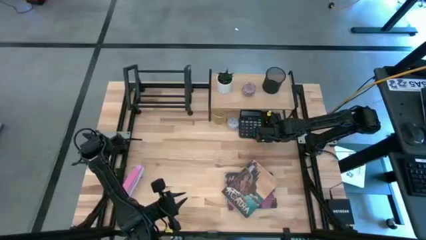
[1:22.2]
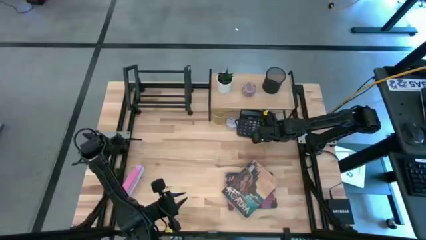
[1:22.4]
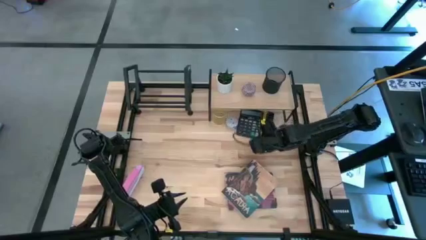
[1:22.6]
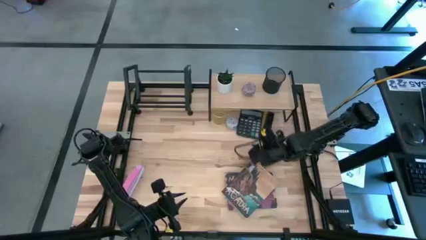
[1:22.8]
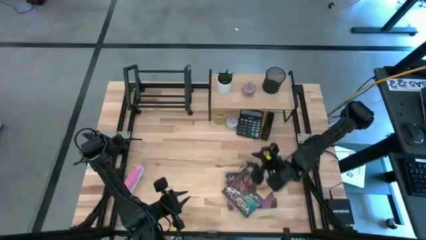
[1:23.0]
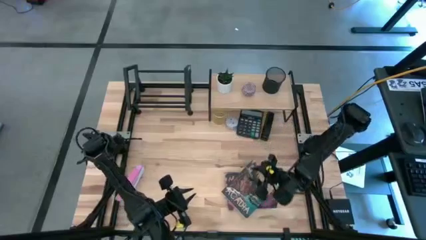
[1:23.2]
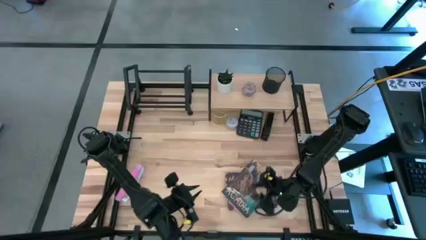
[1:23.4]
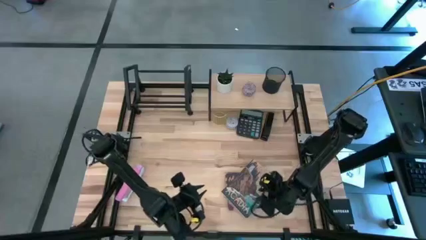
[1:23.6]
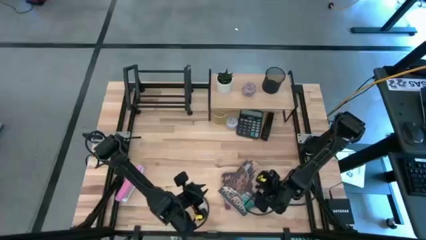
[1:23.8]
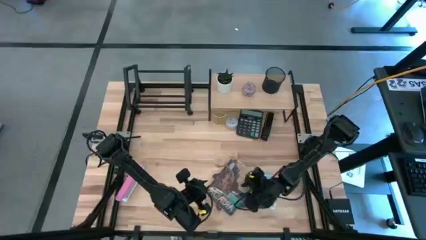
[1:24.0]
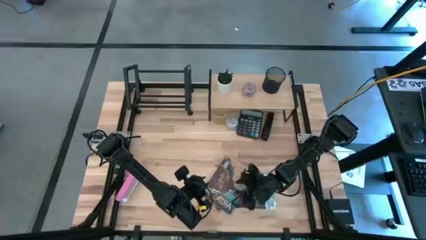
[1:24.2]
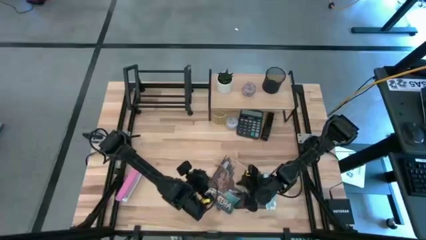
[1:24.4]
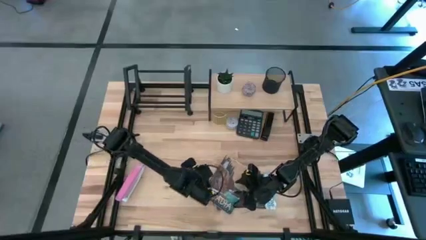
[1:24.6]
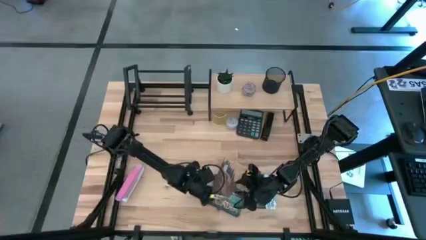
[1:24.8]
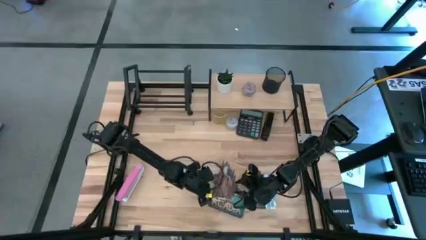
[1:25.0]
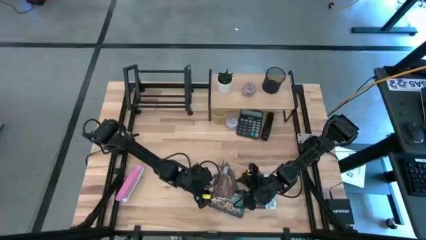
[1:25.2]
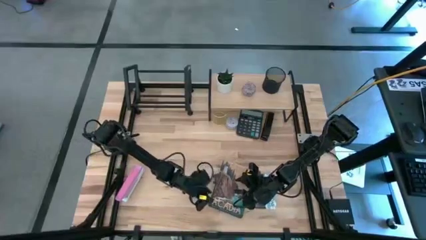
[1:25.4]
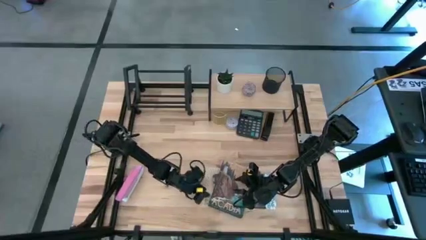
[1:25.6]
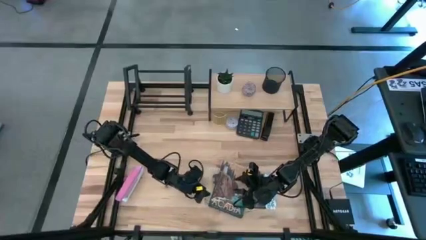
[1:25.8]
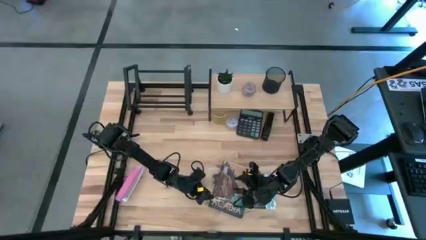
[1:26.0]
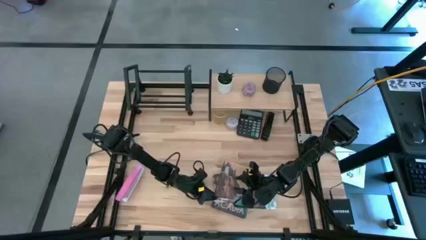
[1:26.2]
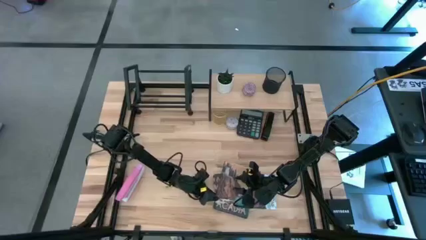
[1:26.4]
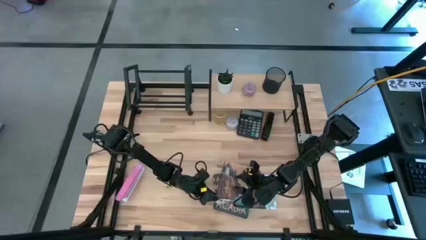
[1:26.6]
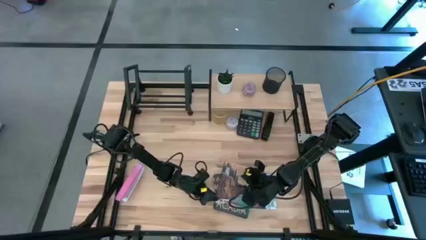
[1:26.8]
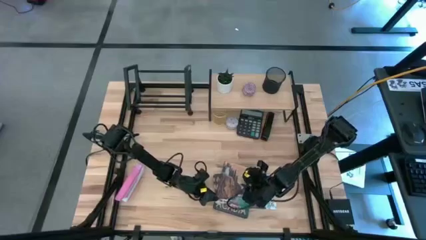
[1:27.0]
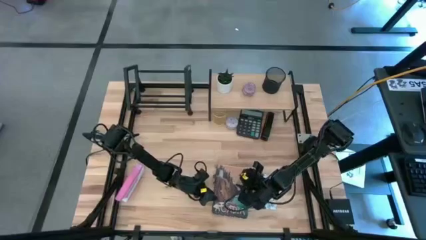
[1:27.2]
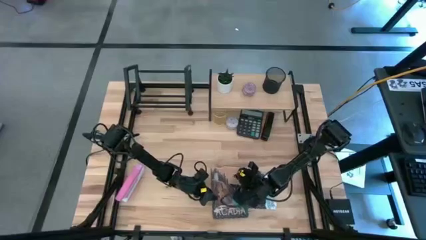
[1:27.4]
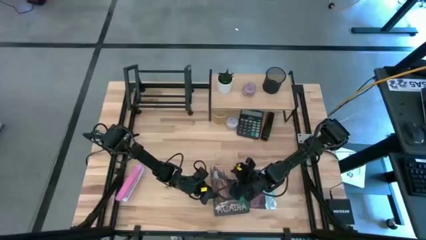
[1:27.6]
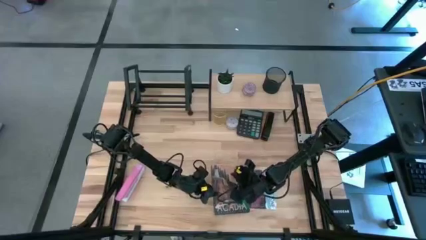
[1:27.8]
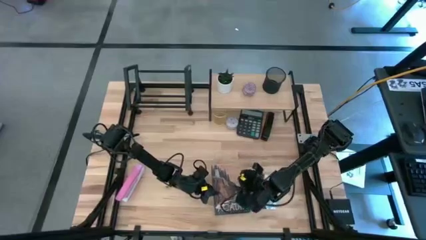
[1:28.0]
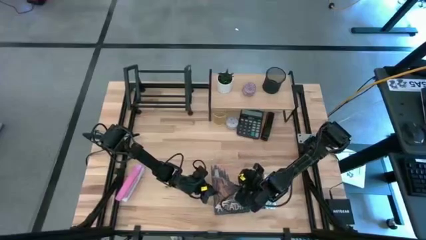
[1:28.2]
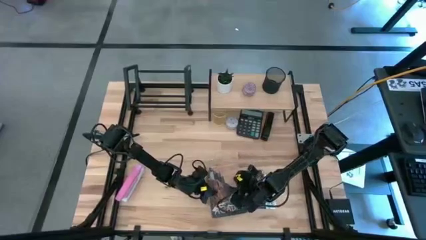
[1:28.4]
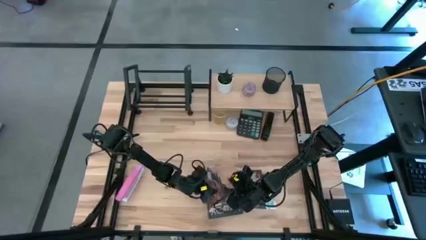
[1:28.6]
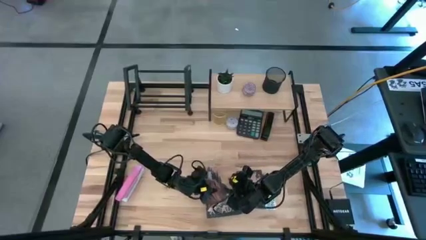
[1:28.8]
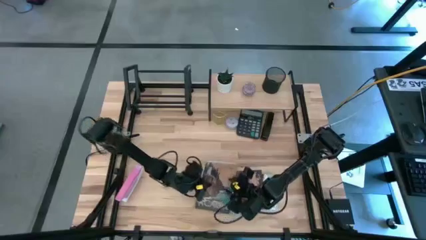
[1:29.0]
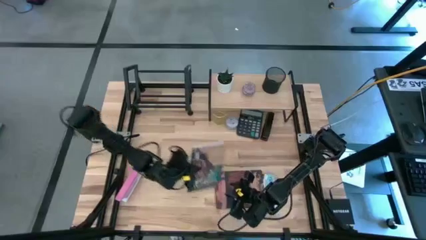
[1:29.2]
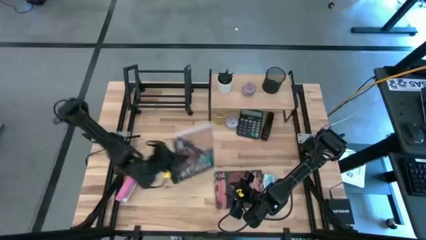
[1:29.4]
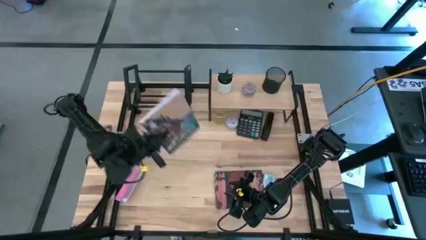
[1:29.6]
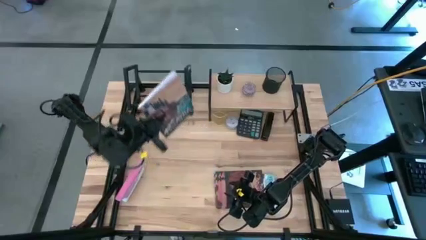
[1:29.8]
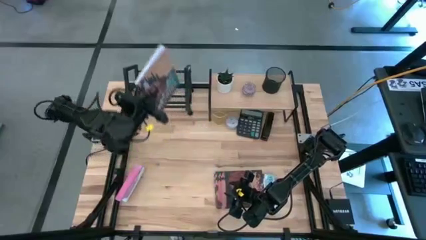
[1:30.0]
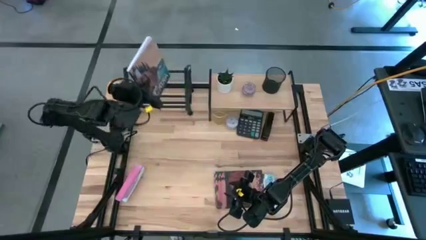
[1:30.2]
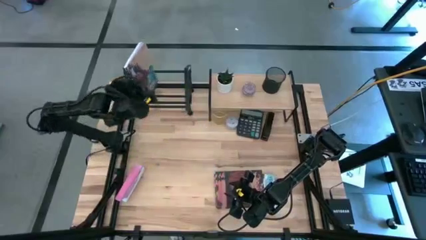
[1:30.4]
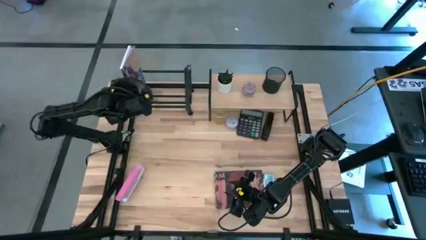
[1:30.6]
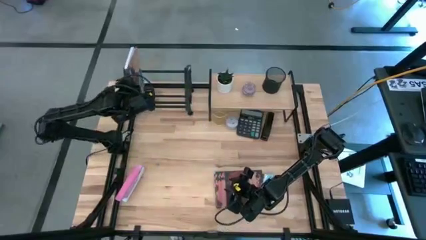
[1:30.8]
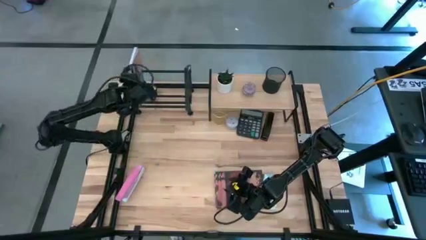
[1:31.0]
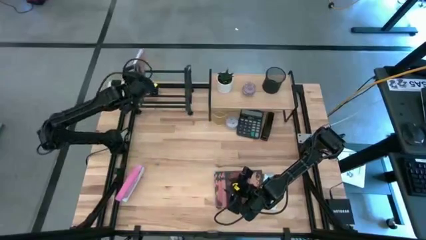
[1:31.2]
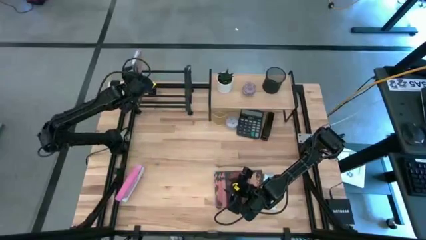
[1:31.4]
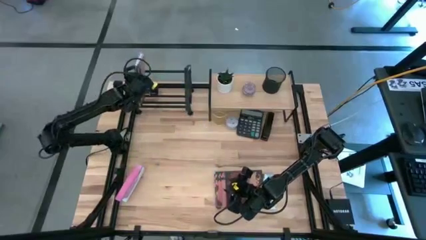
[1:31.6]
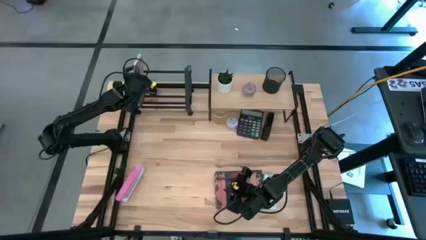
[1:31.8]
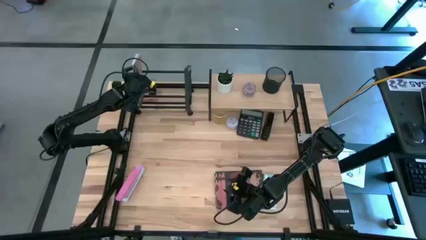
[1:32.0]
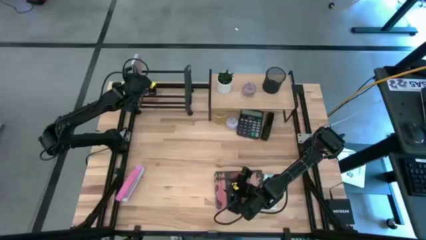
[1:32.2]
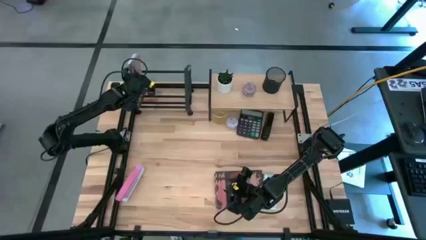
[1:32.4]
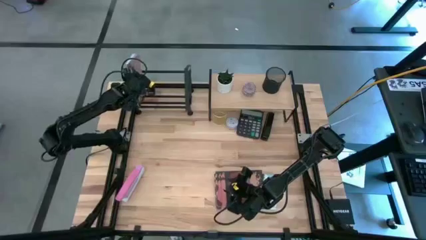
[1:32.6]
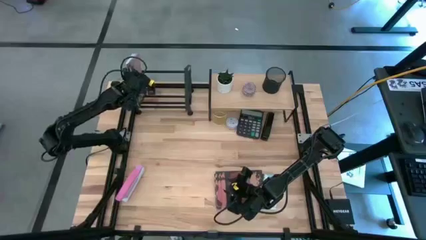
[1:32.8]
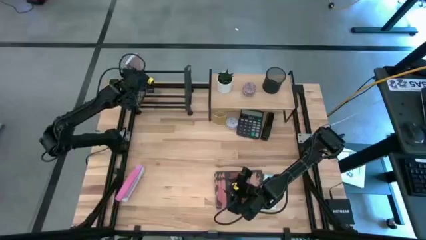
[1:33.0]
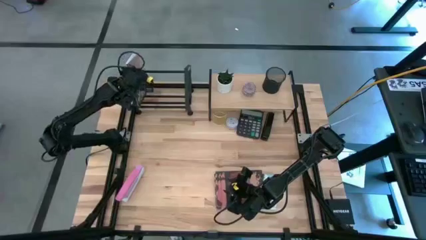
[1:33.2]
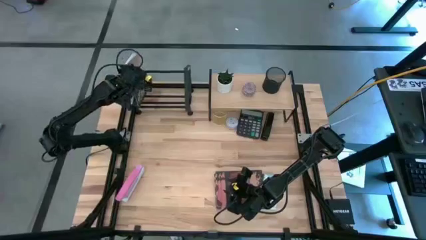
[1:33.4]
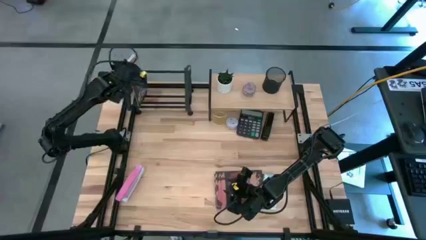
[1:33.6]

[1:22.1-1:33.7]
Task: Stock shelves
Put the brown book into the book holder

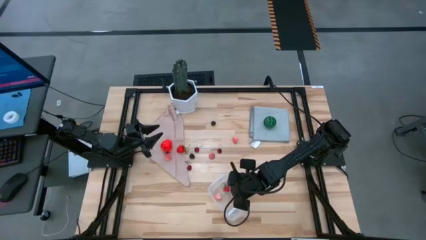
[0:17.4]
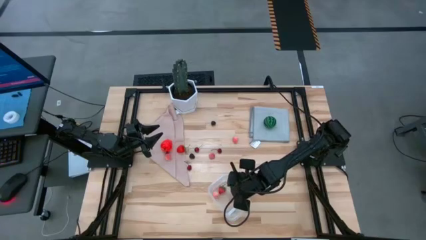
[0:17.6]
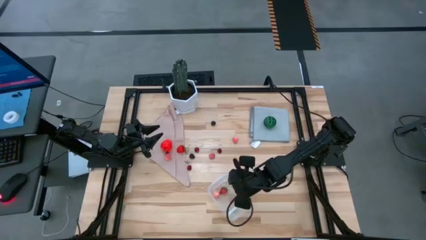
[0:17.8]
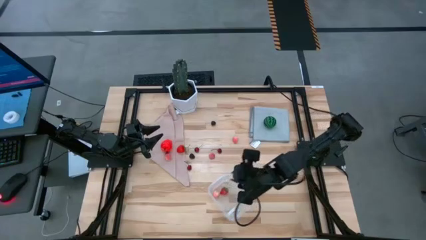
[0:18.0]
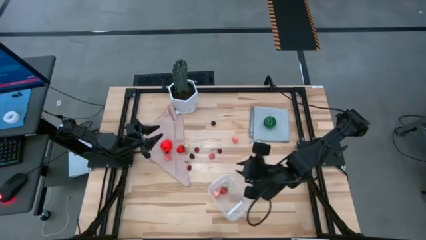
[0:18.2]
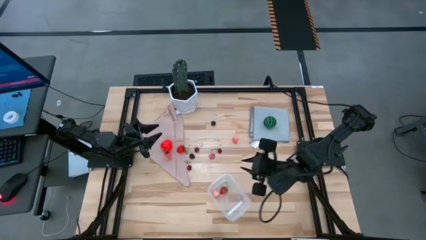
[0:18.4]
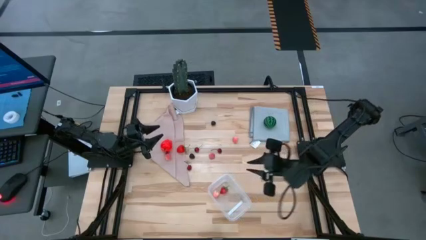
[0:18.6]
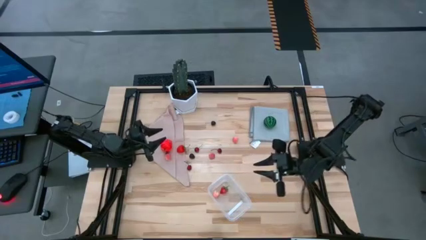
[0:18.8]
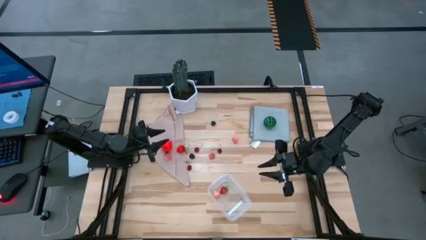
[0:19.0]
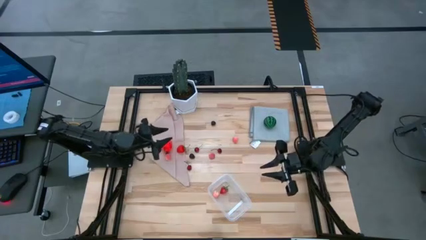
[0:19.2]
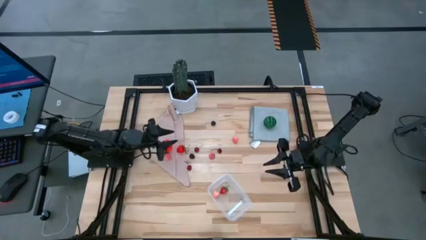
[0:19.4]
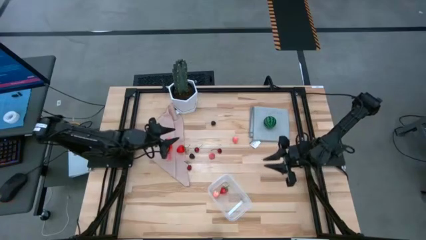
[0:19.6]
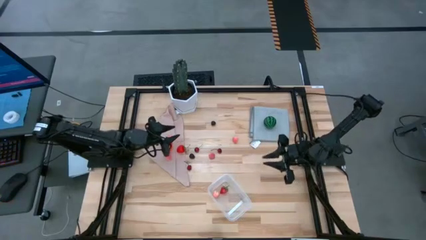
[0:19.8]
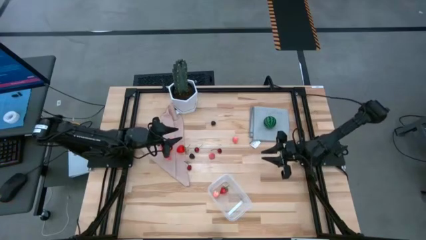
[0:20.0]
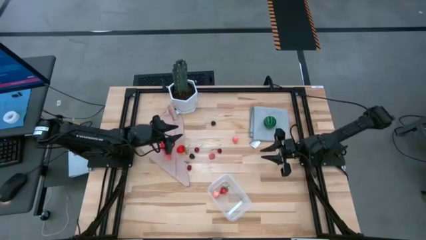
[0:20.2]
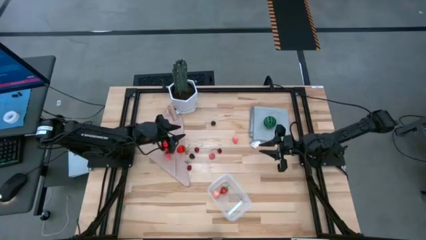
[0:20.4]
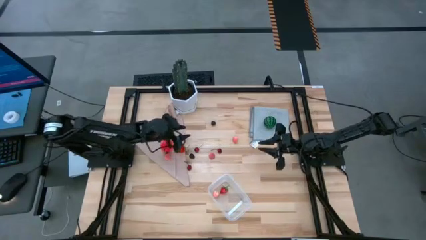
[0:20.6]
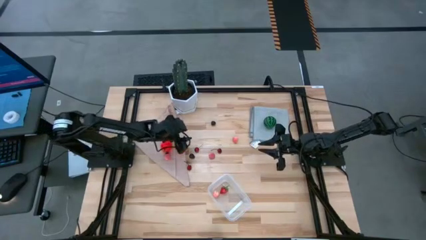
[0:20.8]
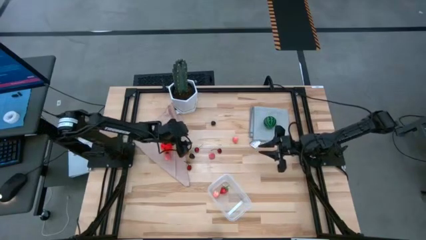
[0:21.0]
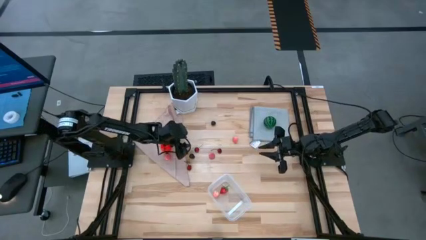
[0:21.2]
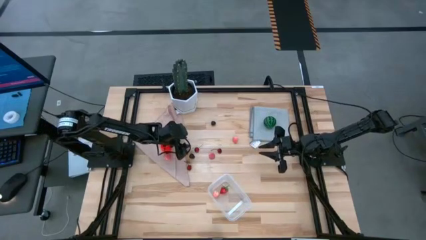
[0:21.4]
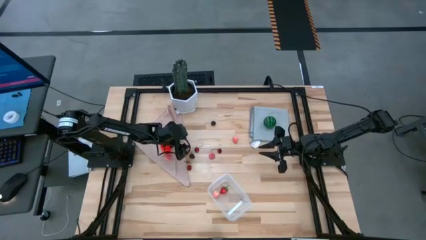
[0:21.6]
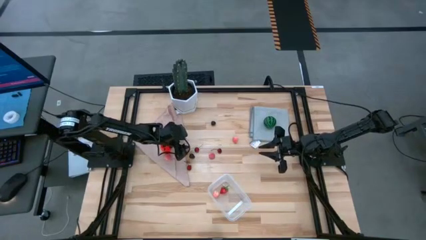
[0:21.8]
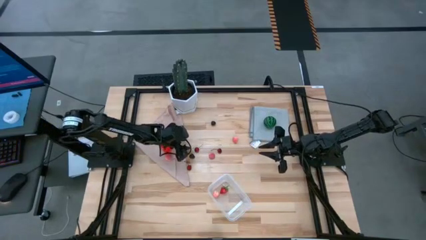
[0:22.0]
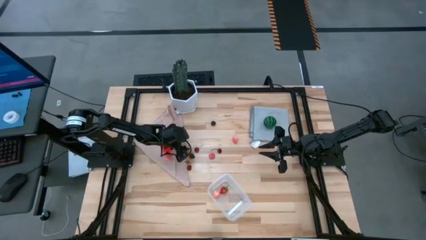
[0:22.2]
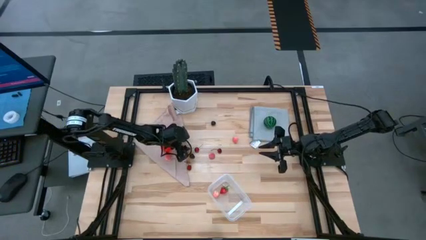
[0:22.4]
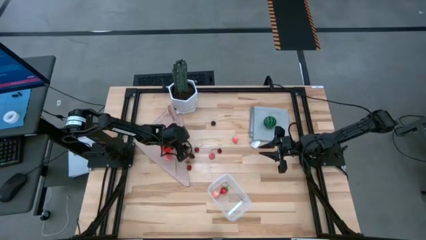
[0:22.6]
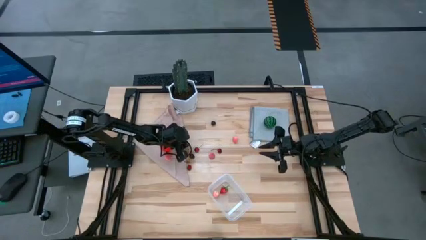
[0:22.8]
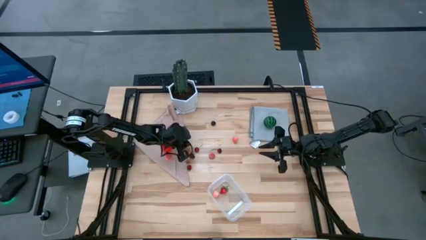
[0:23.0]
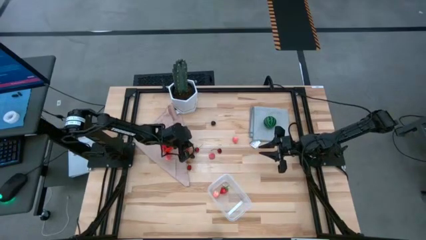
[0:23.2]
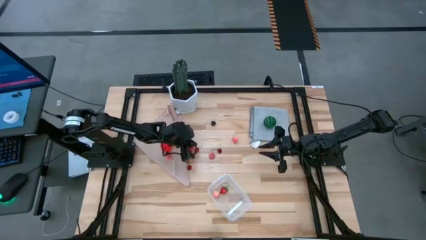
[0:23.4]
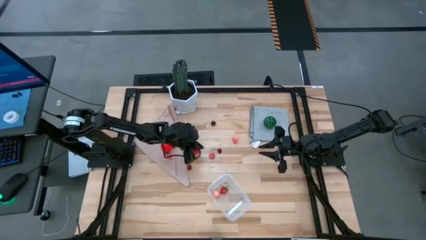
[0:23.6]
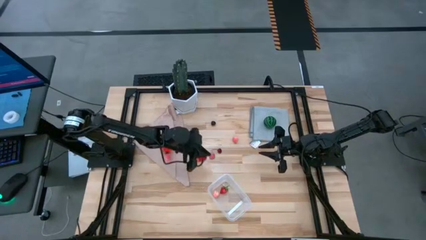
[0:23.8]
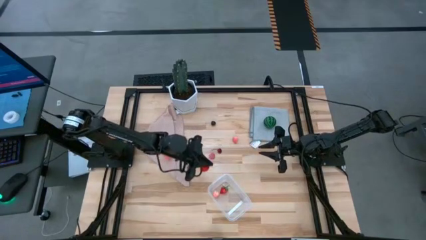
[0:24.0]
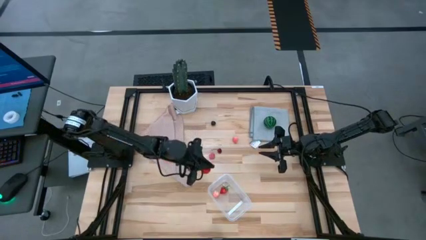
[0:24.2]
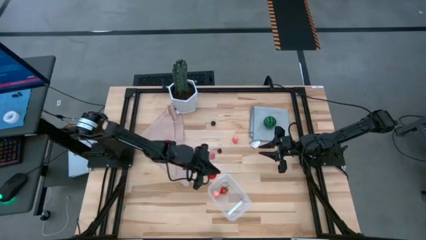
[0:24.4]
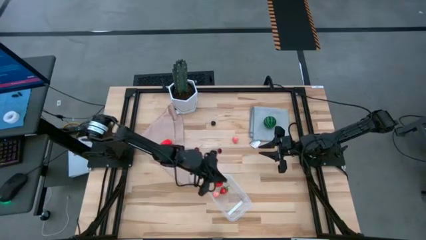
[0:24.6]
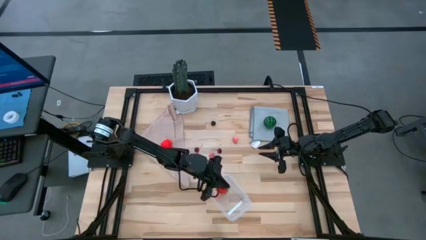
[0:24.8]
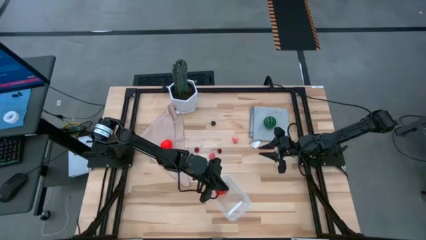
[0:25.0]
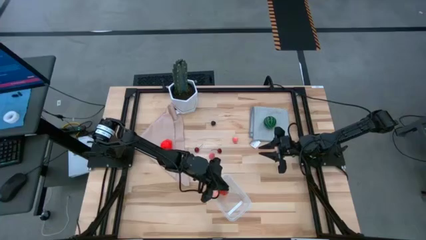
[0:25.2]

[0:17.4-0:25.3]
Task: Pick and placing Produce into tupperware
Put the strawberry into the transparent bin
